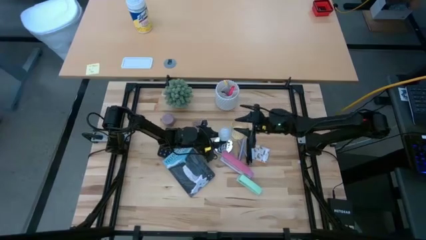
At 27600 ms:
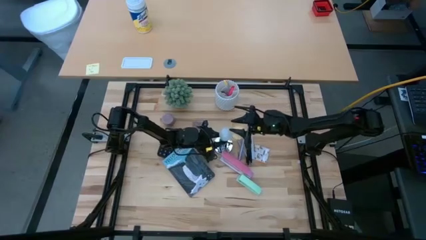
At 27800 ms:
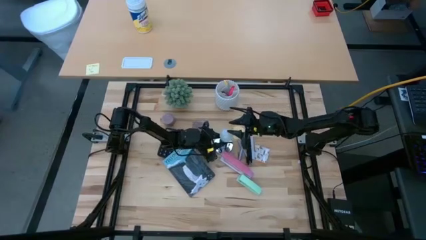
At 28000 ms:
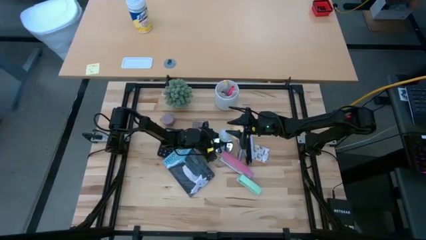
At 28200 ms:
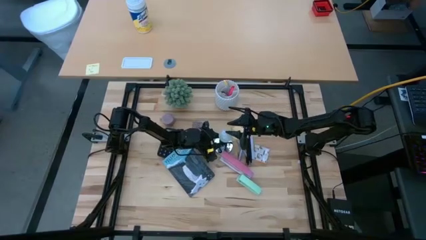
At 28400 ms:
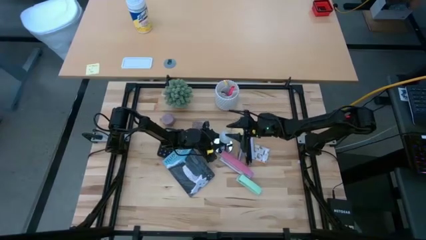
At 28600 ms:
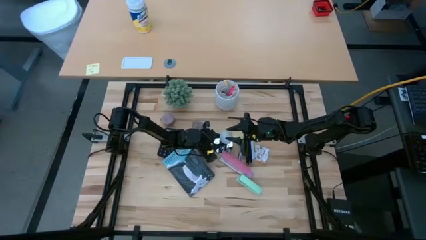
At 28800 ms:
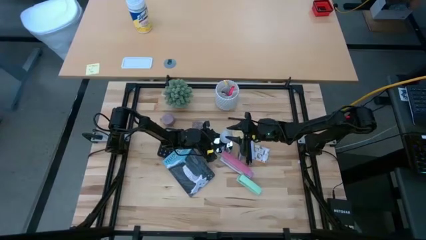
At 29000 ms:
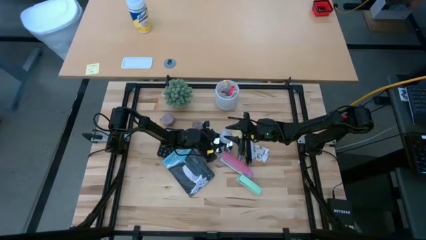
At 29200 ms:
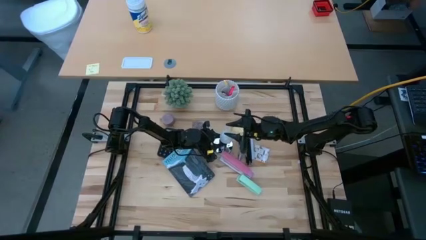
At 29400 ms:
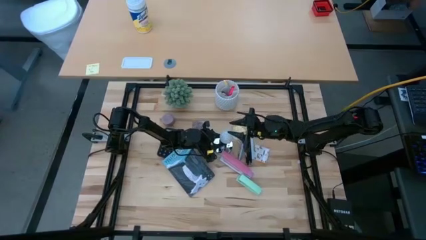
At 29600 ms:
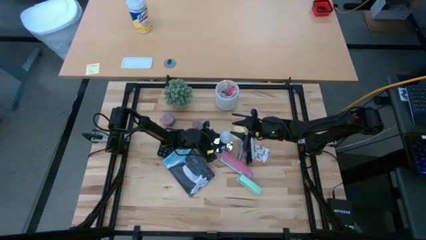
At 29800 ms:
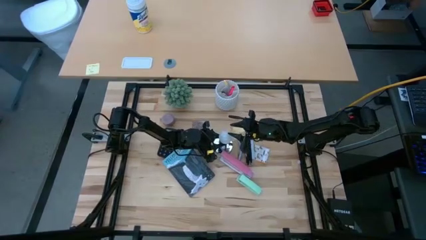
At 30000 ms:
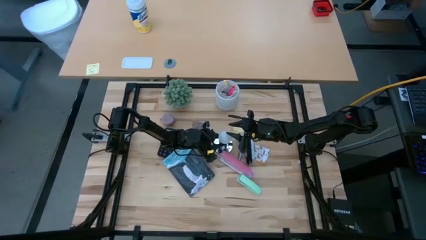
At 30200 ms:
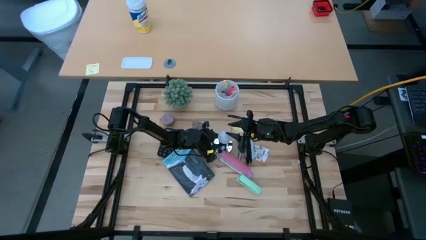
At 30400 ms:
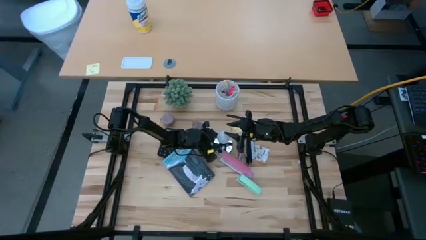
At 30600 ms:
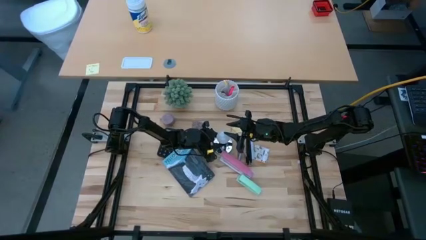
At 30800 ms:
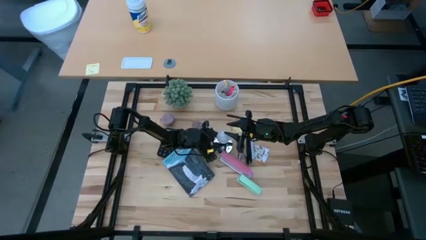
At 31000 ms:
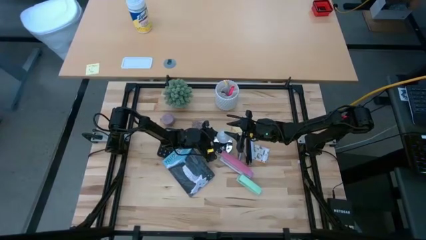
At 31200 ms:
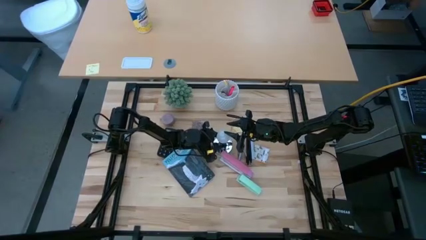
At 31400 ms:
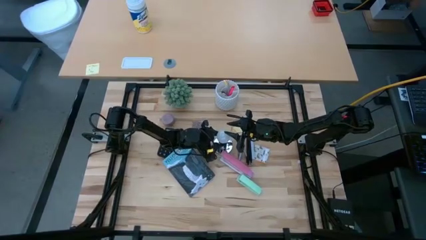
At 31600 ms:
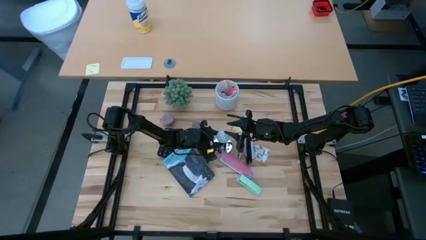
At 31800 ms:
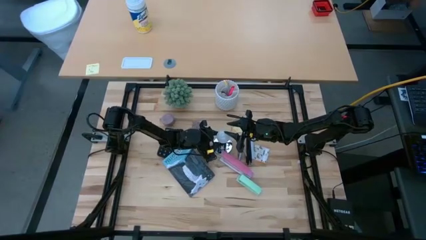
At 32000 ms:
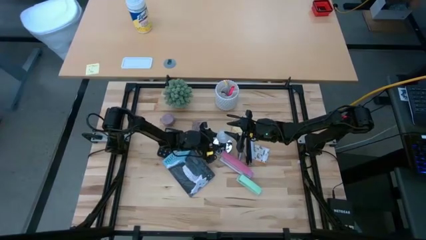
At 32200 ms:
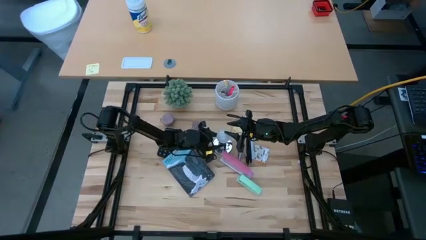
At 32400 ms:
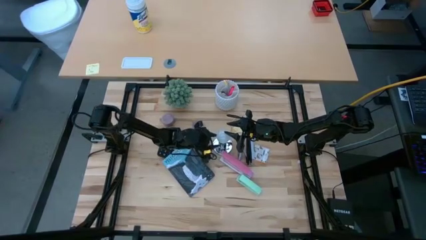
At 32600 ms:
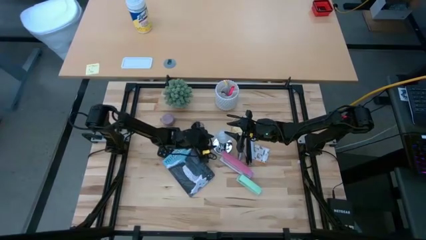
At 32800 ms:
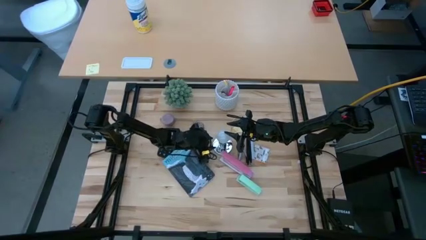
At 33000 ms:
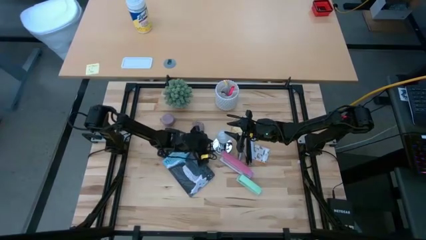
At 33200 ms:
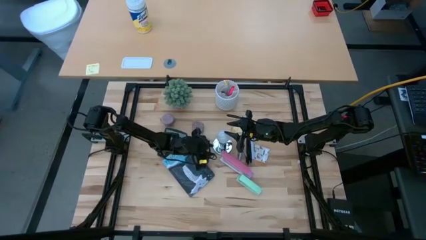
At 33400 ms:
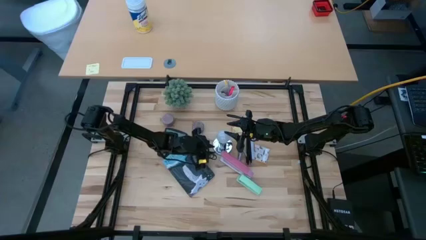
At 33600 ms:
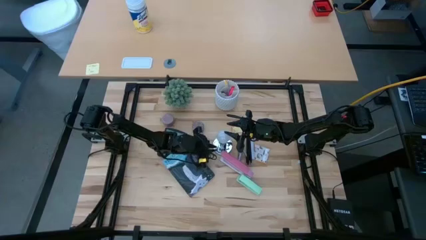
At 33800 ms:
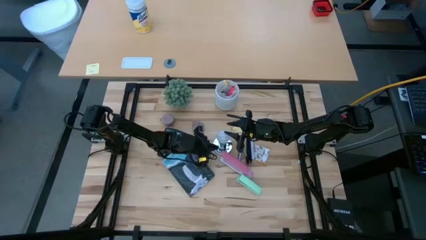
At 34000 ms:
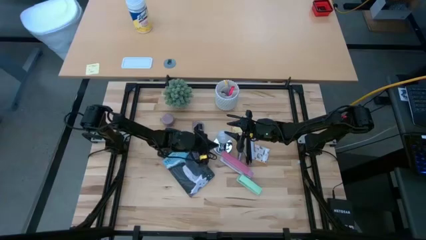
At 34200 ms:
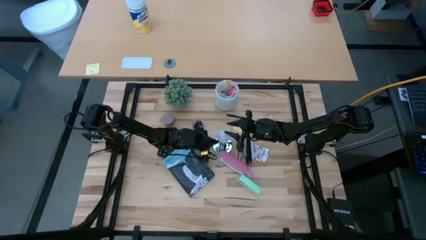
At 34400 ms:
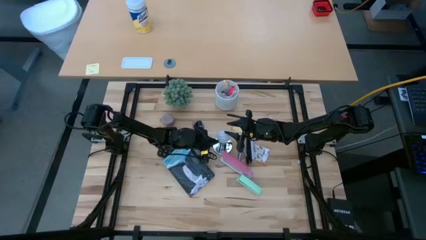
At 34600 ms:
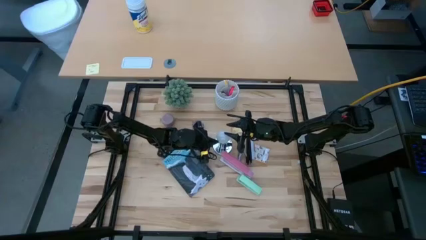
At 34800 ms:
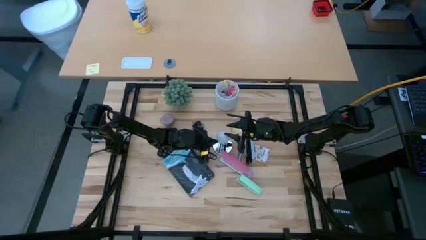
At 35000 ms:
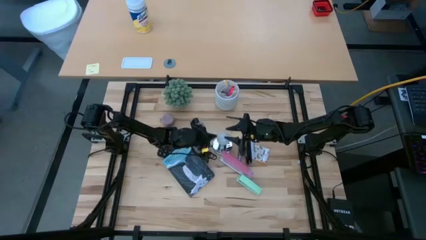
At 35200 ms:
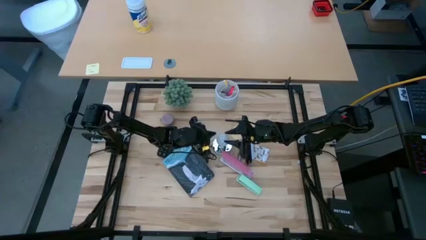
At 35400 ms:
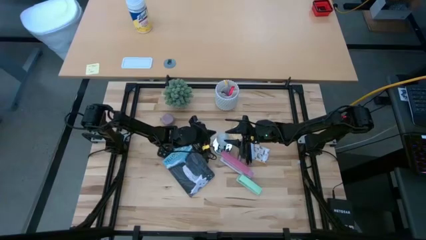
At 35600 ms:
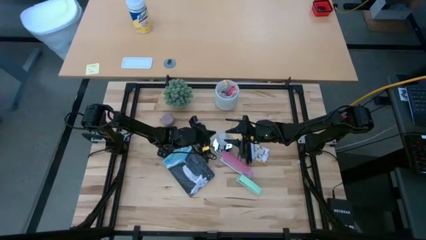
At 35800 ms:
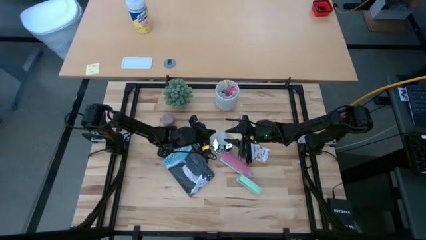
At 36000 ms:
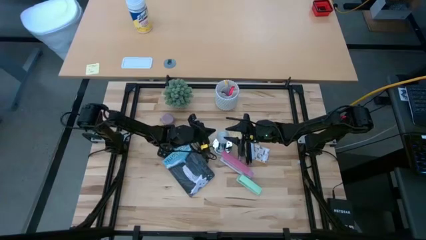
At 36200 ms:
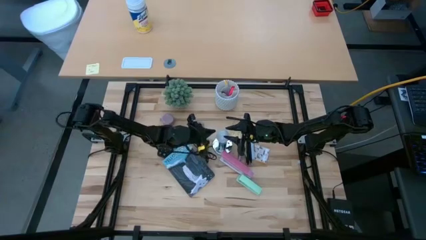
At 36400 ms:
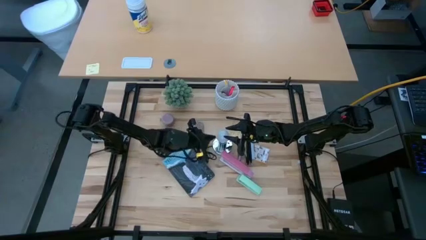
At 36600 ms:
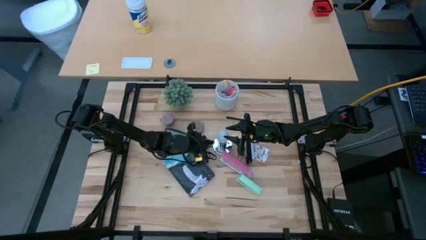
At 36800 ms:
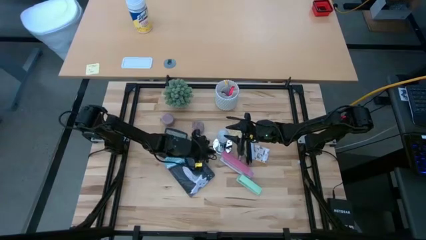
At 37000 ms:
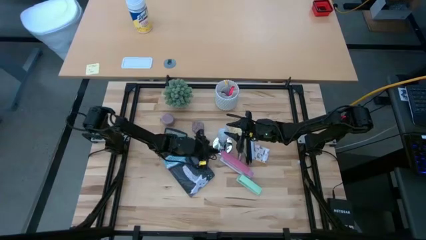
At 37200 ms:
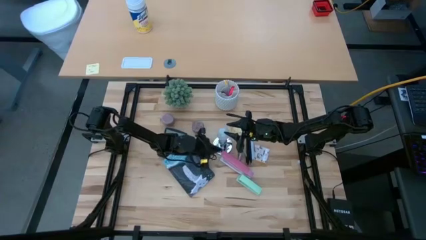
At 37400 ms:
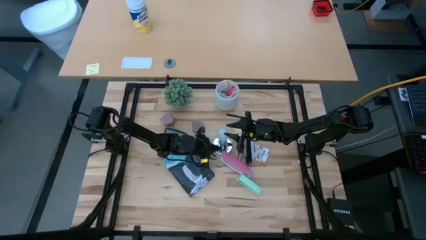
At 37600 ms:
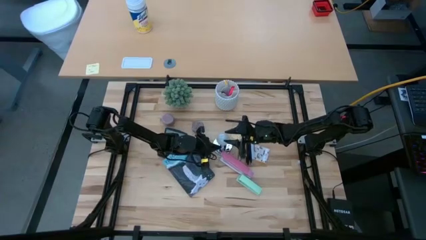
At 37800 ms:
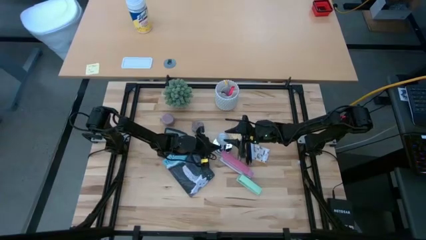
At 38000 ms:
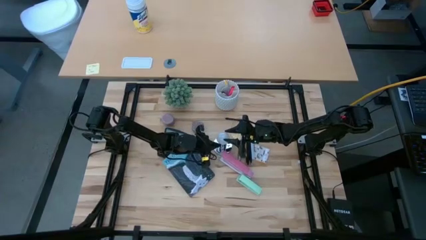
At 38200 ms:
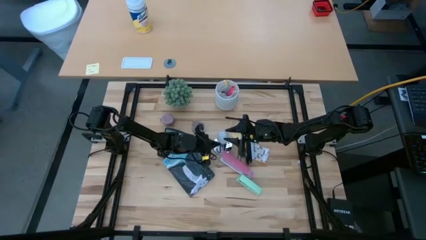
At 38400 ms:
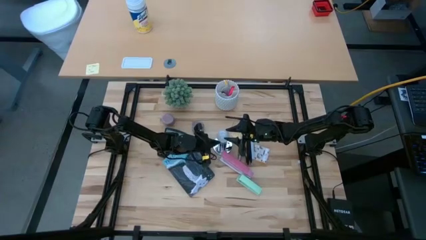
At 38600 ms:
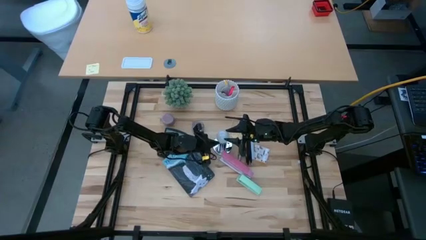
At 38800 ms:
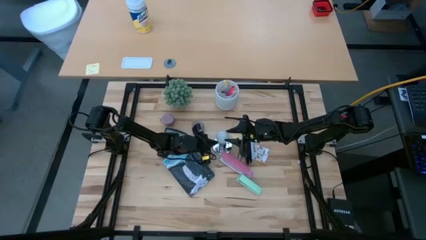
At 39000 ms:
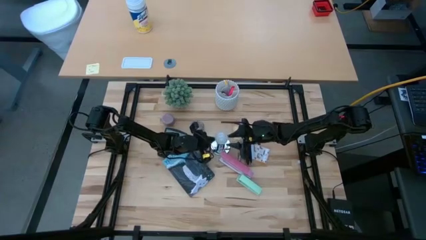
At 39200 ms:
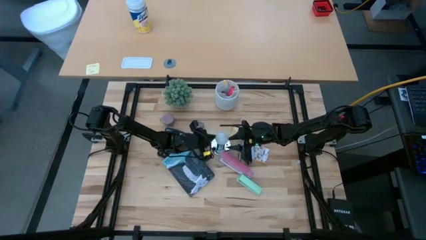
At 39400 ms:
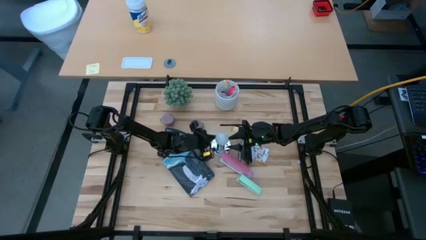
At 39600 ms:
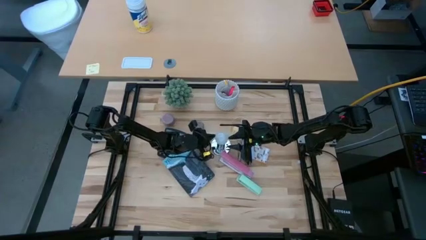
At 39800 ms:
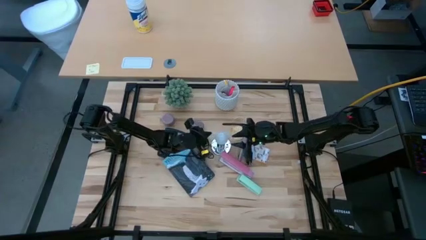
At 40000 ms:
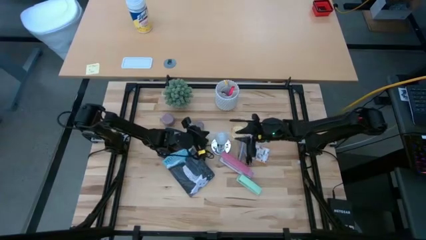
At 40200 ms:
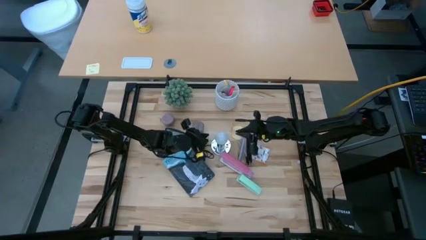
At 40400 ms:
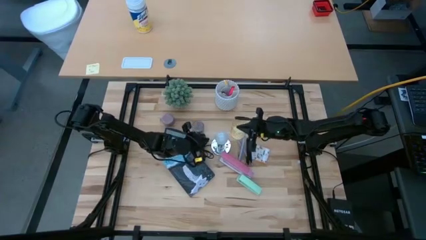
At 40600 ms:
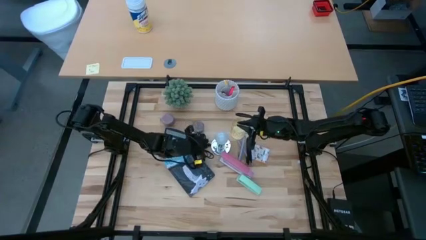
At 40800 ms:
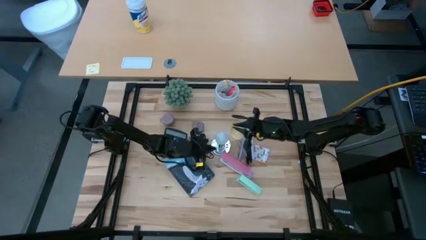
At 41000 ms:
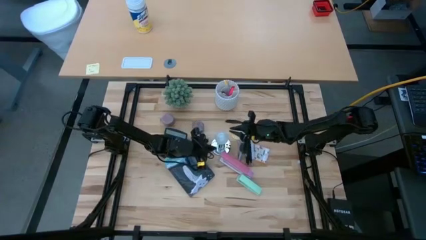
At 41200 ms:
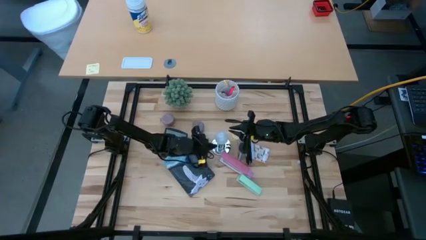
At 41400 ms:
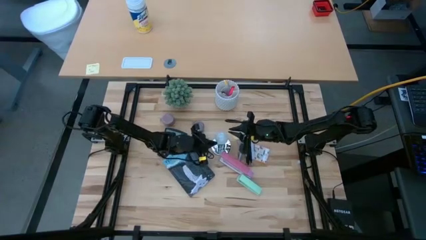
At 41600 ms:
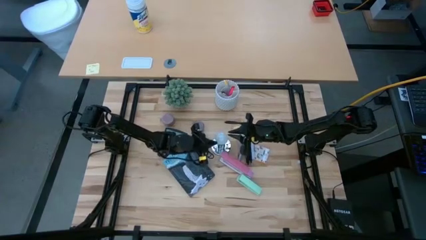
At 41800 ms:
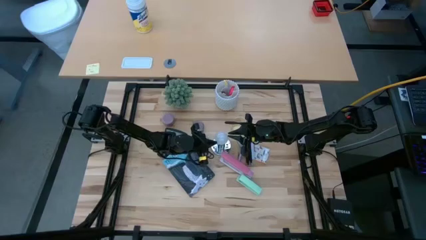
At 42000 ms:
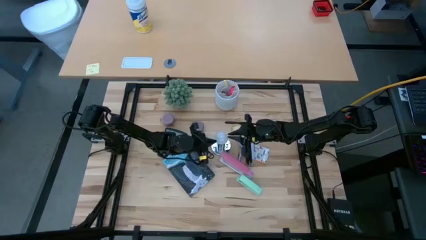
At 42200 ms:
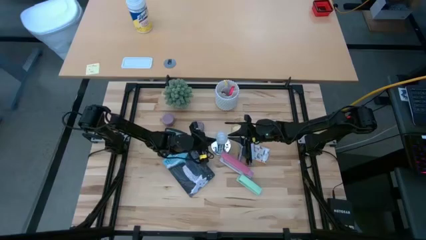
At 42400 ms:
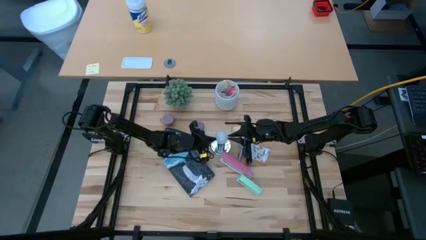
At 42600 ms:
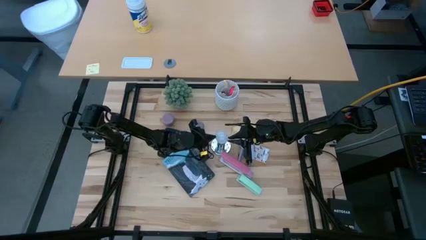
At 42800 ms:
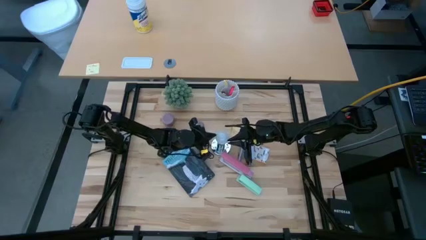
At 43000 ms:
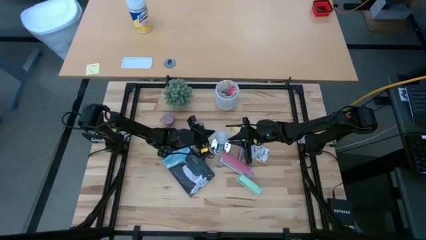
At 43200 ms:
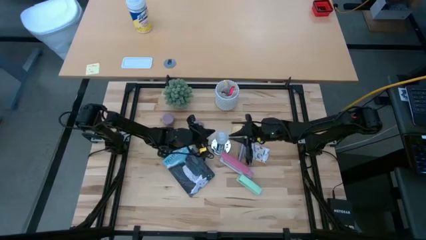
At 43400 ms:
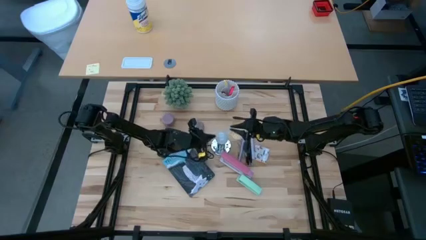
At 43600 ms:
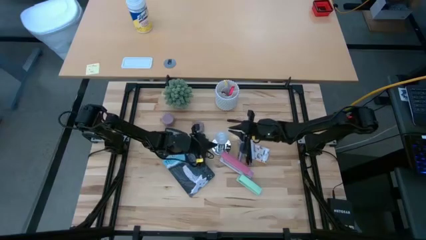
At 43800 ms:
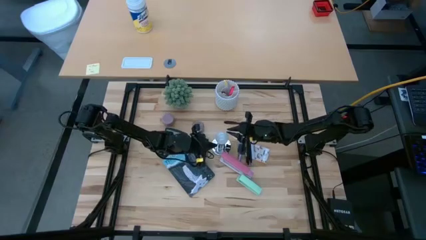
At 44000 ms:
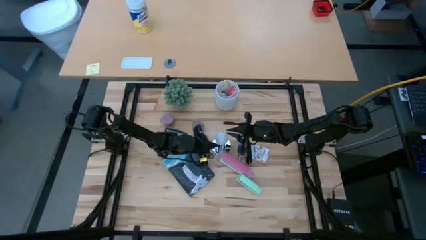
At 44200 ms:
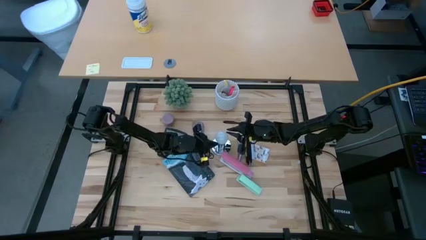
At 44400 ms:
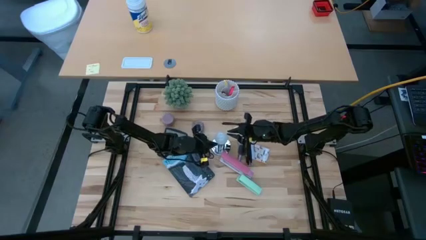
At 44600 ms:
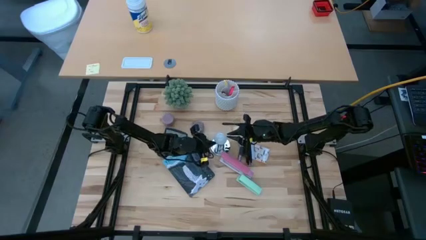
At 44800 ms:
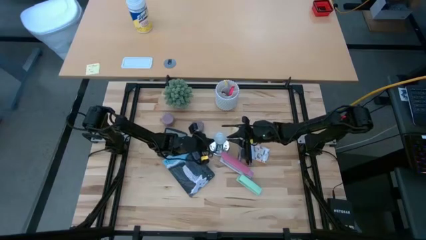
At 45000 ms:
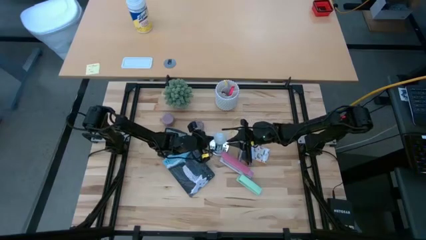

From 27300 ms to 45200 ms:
Task: Screw lightbulb
Insert the white lightbulb into the silver lamp
